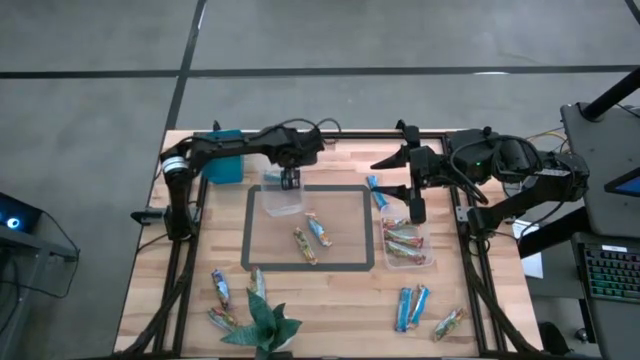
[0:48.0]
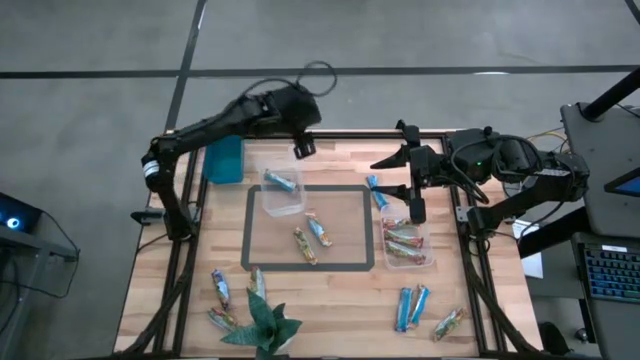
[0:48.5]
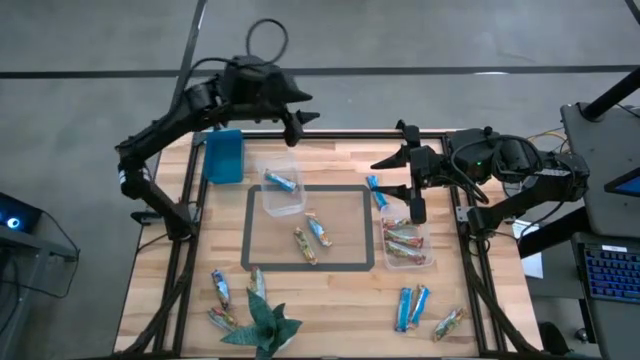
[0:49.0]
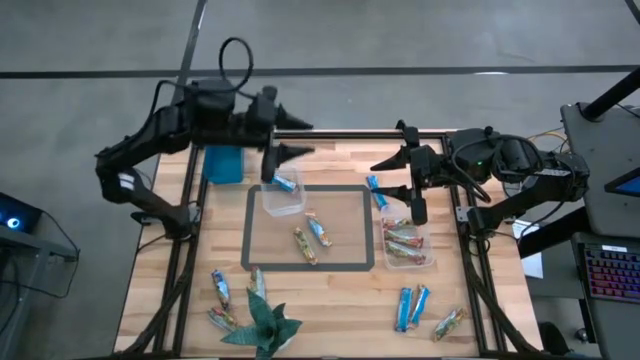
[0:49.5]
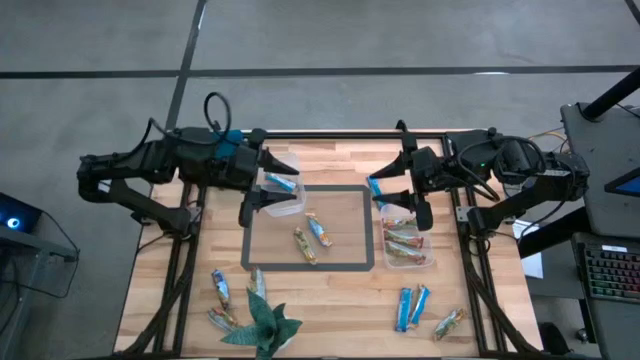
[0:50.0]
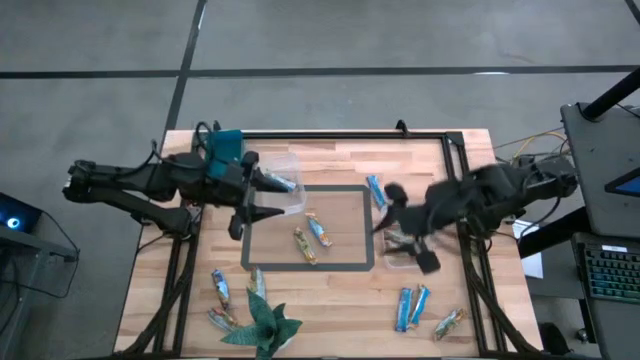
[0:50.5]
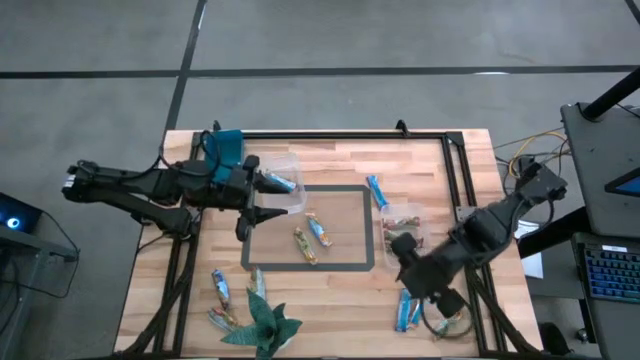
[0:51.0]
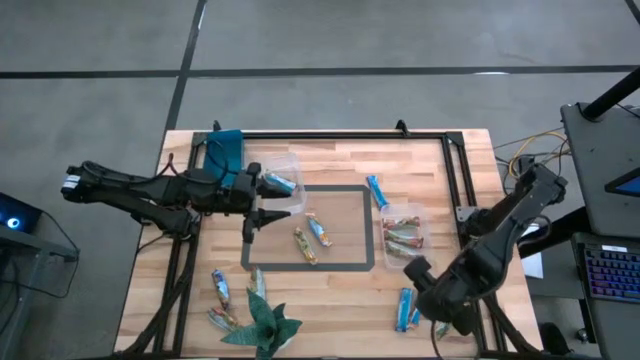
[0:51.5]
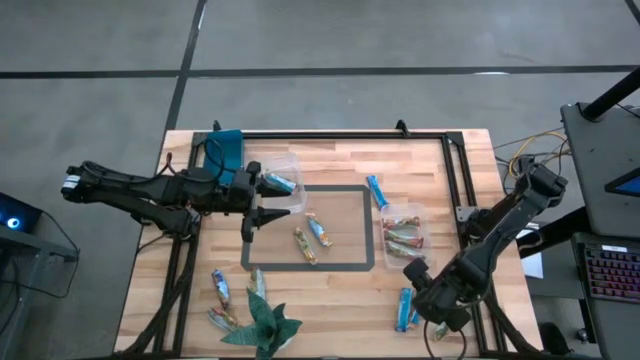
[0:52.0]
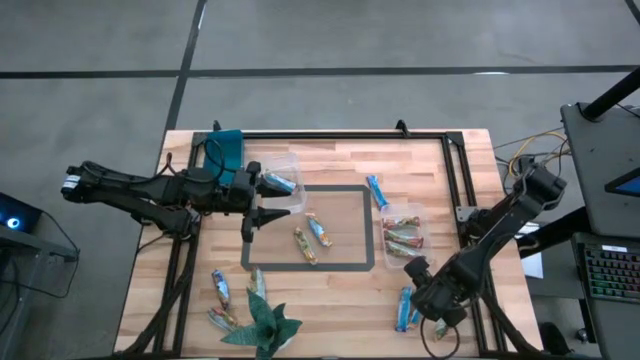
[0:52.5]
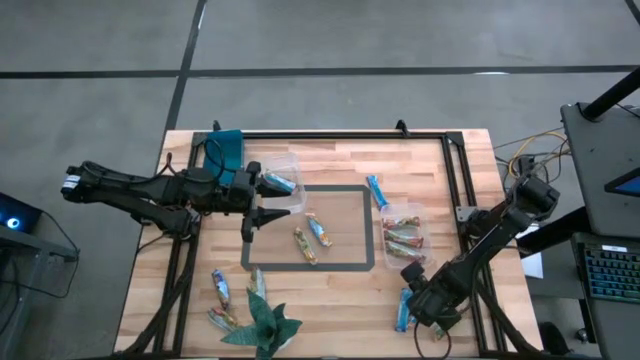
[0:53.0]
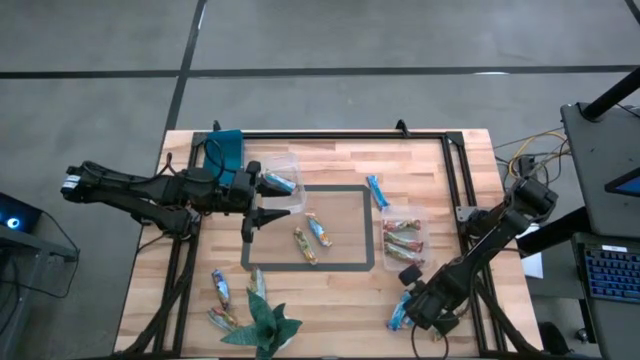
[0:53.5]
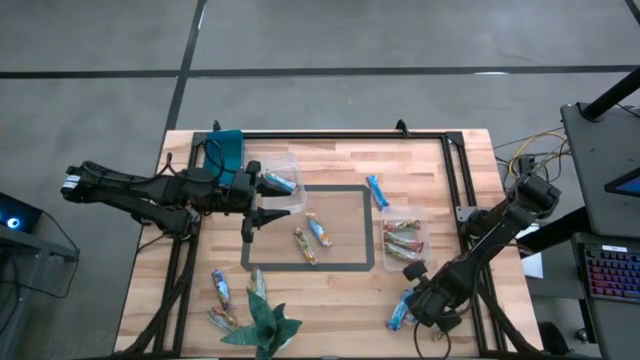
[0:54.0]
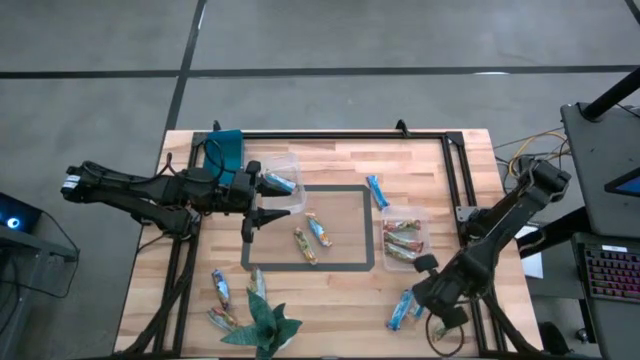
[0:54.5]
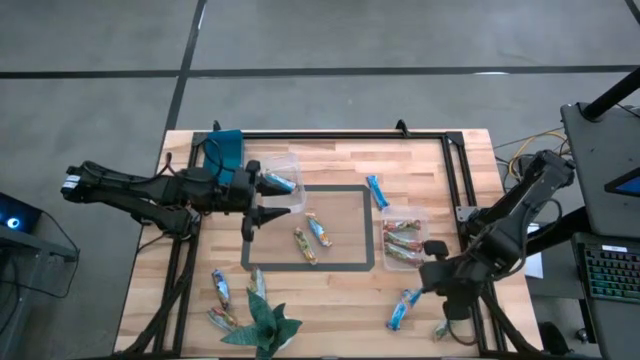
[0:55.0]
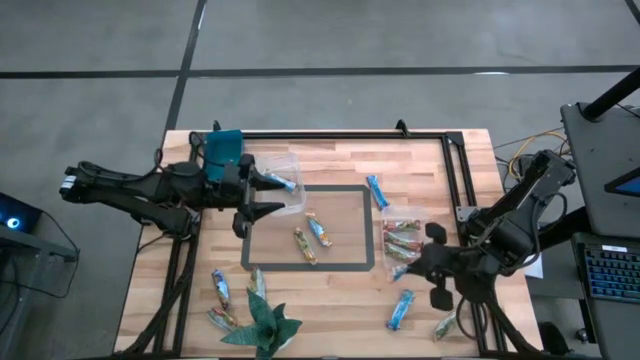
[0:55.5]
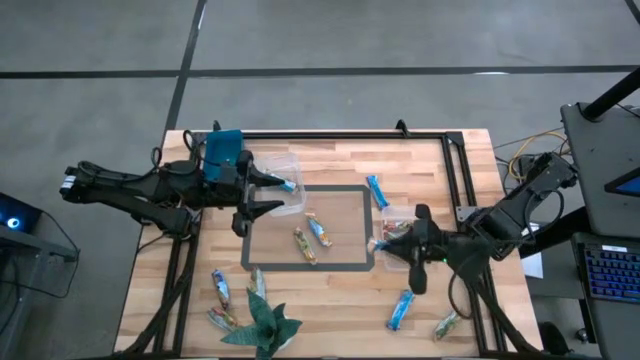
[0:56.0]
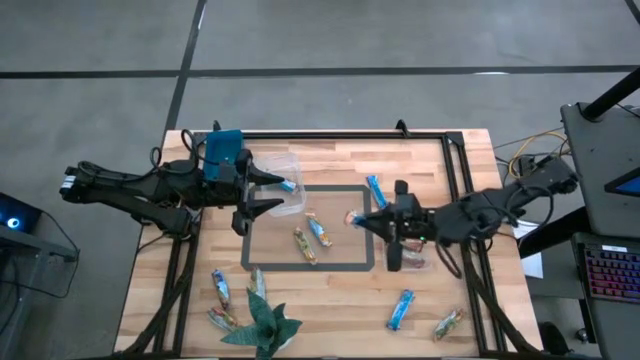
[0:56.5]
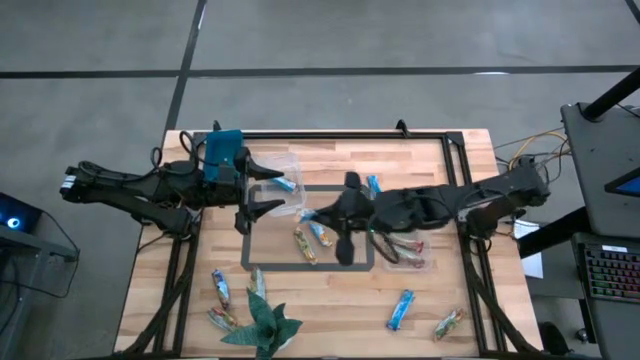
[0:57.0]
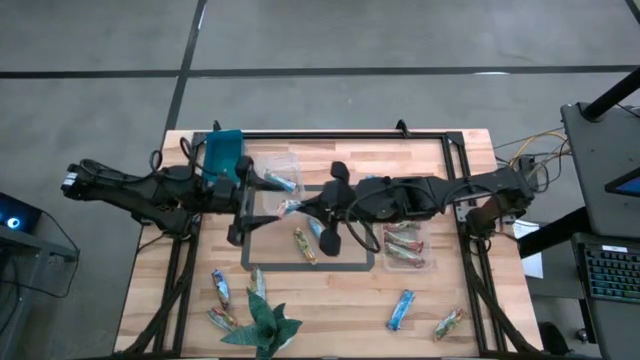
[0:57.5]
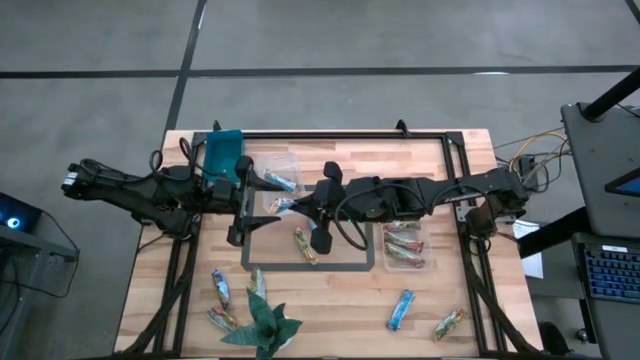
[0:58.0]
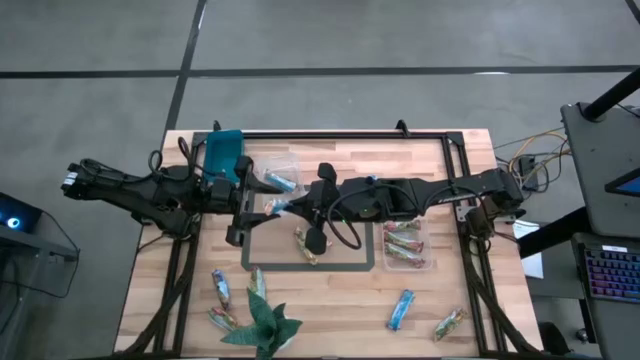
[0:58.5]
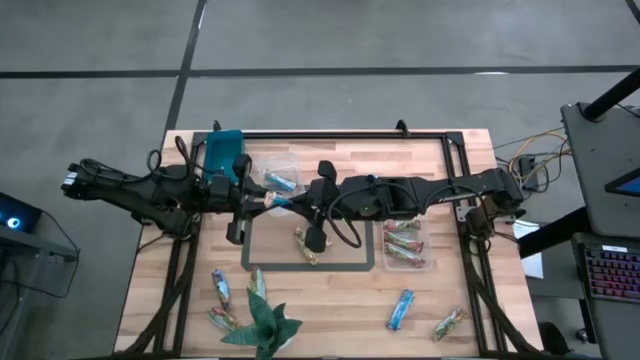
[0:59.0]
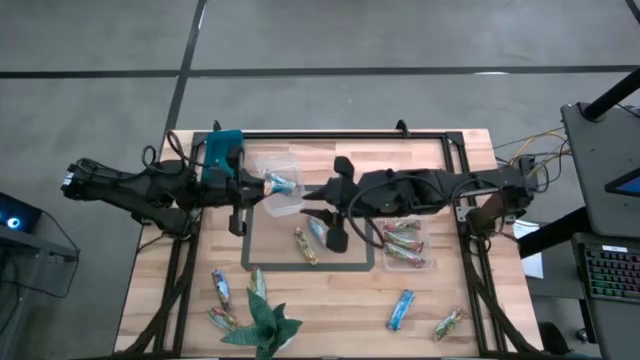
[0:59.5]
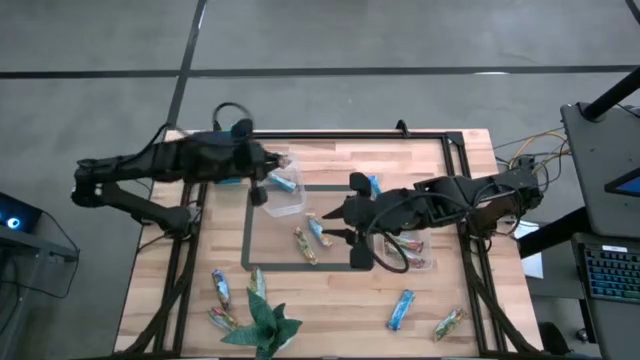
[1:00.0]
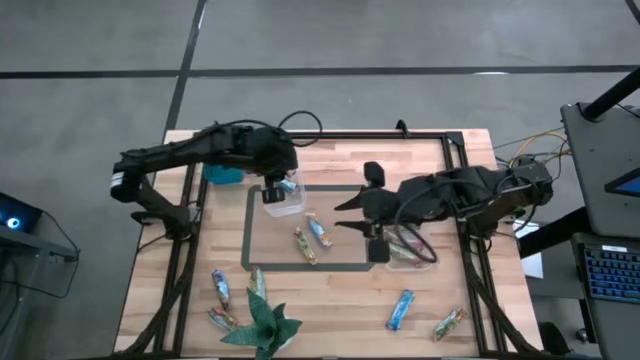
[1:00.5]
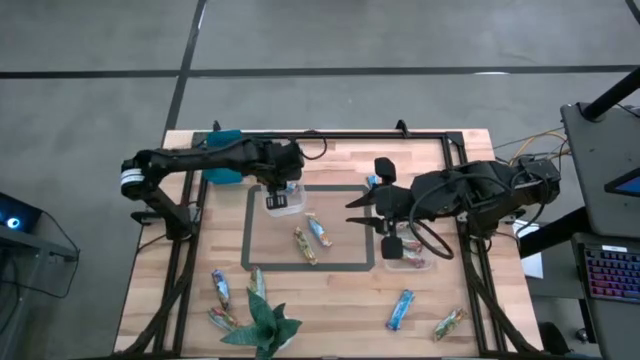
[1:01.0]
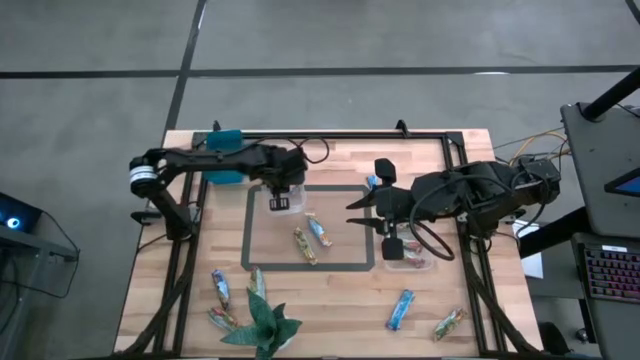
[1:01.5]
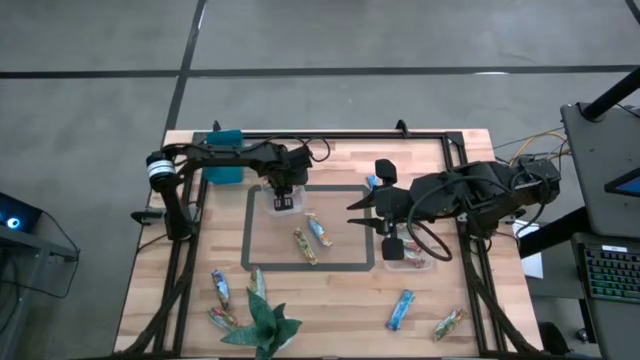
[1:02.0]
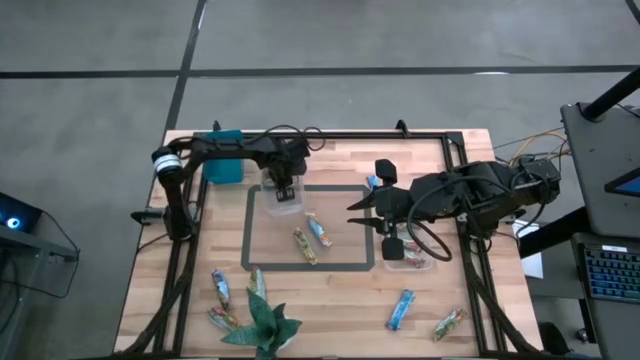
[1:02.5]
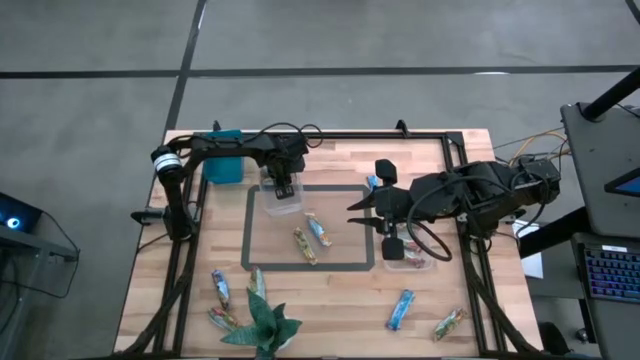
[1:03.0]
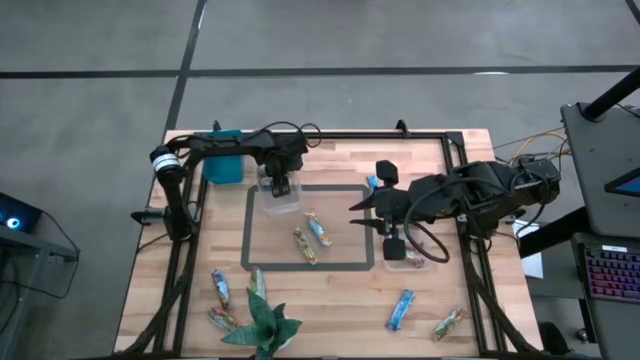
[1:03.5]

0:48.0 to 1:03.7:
Task: Pick and place Granola Bars by type
Put the yellow granola bar into the left transparent bin

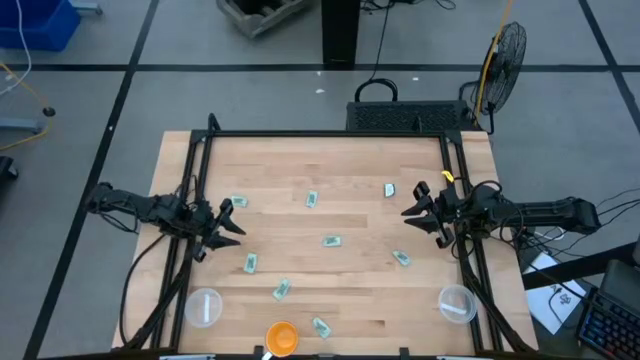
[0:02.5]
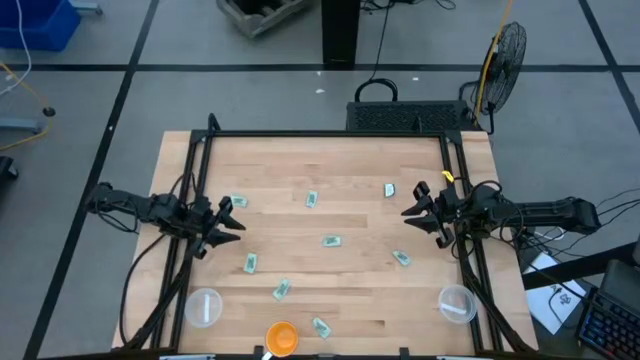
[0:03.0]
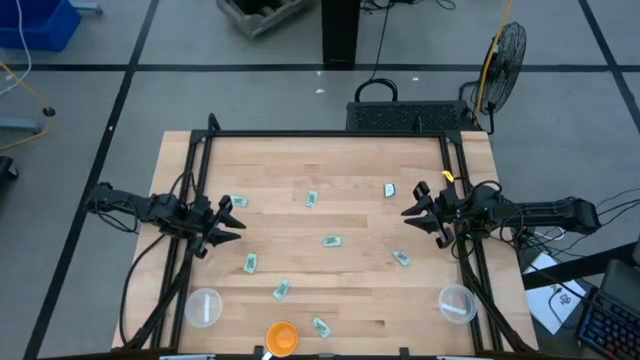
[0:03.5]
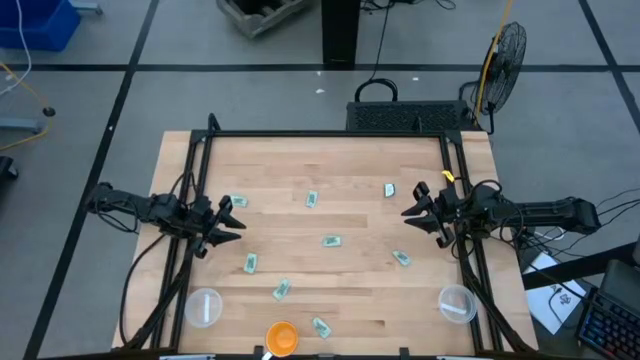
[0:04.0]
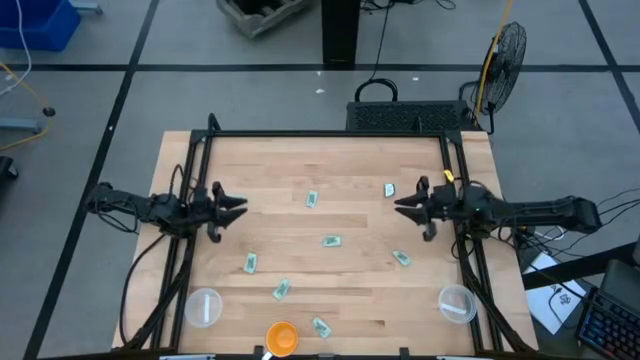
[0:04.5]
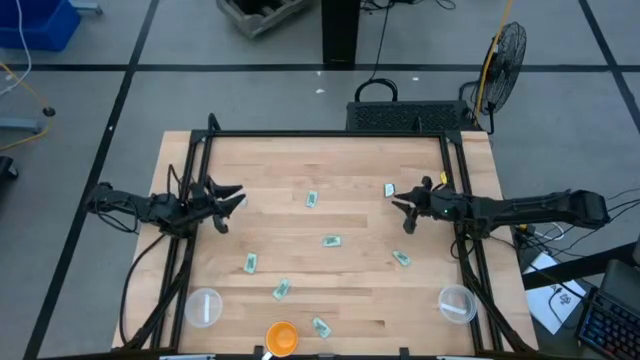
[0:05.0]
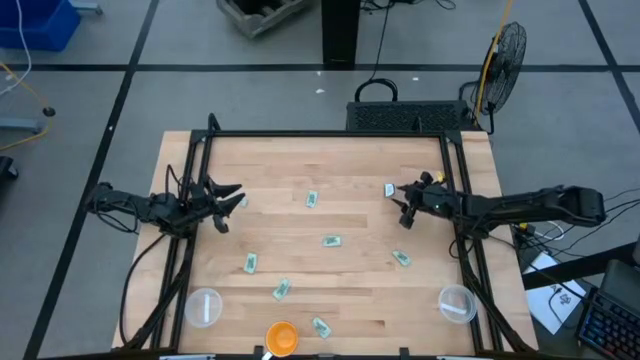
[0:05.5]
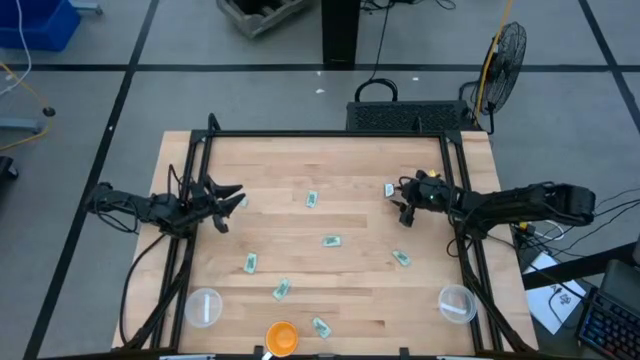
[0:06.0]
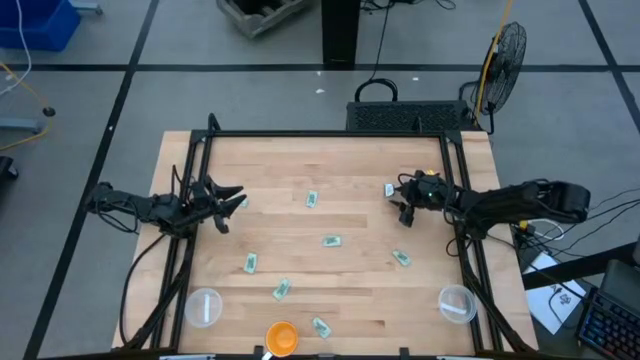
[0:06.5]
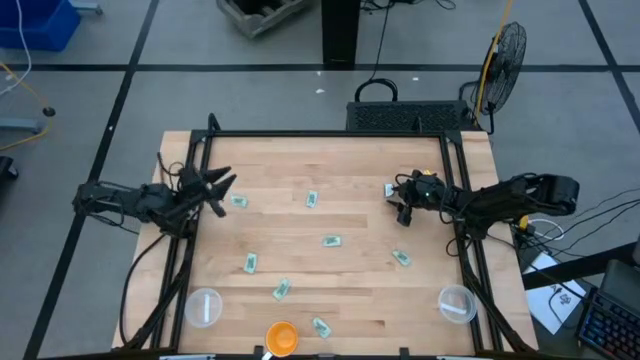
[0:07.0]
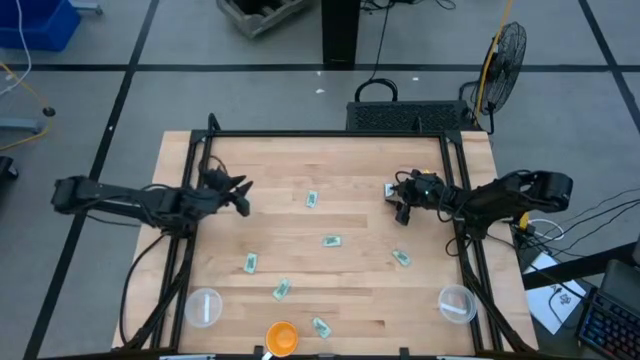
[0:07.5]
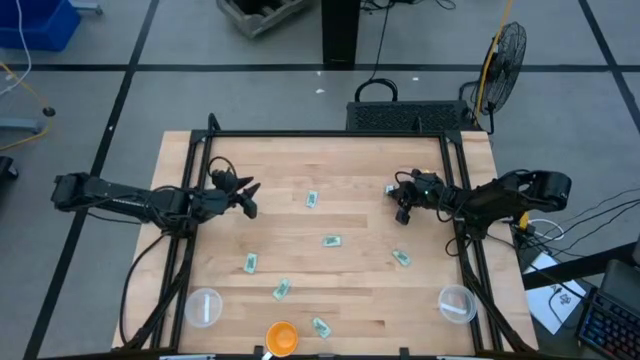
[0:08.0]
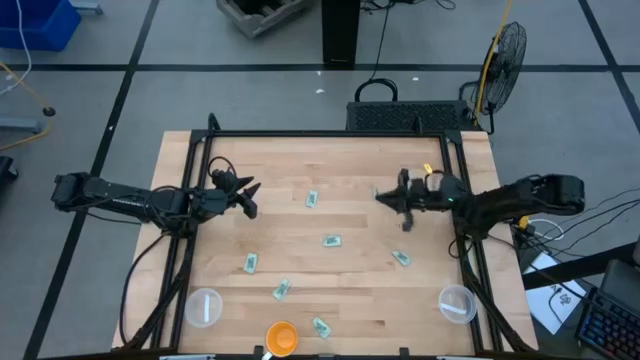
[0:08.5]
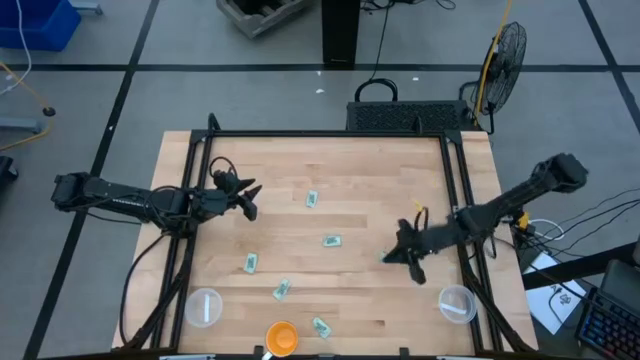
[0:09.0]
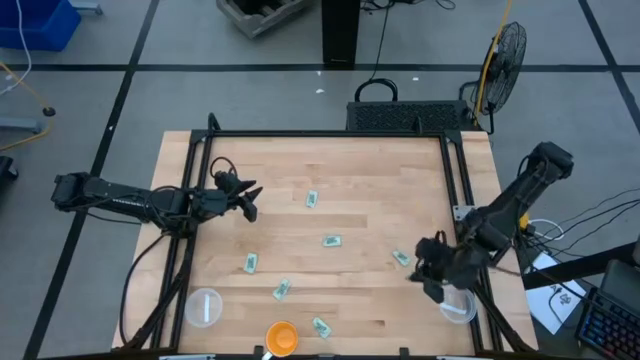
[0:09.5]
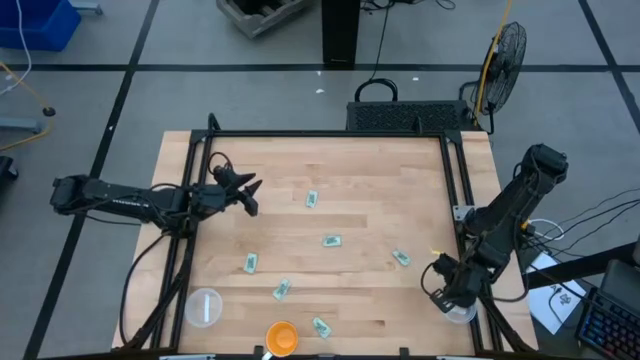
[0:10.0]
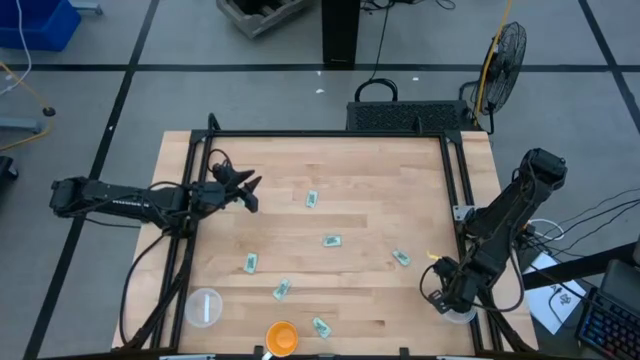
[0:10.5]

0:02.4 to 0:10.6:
Task: Pick and place Stevia / Truvia into bins
Put the stevia packet into the right transparent container
